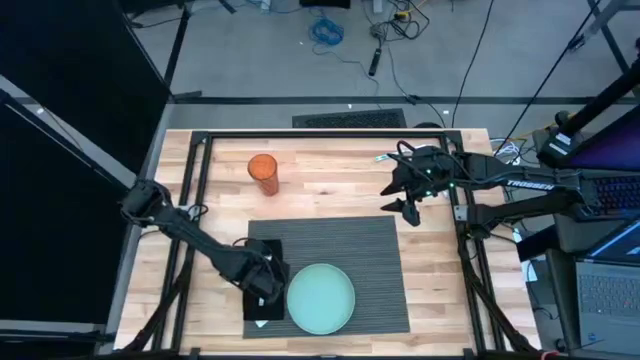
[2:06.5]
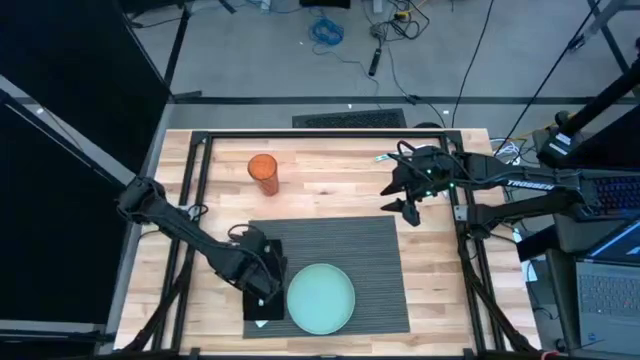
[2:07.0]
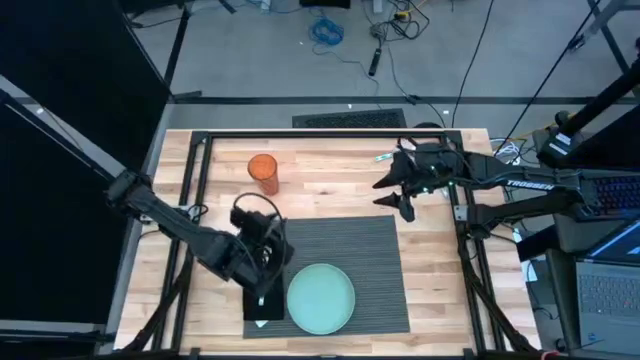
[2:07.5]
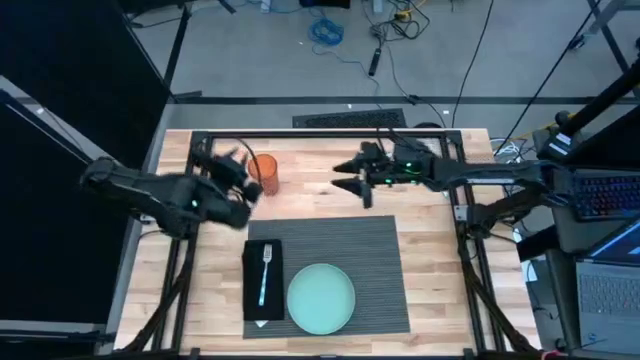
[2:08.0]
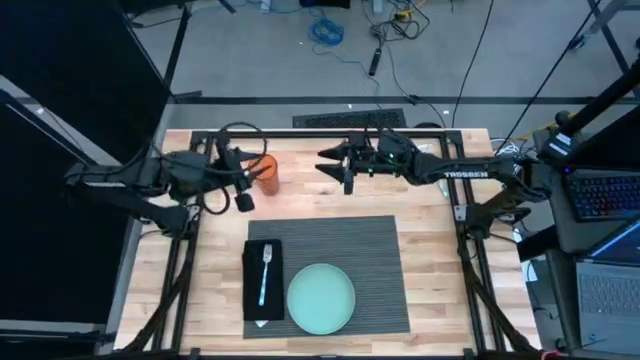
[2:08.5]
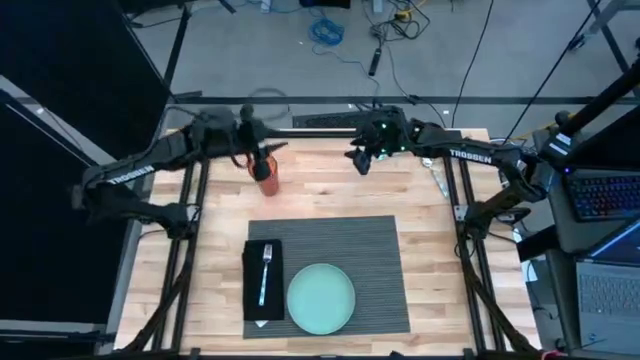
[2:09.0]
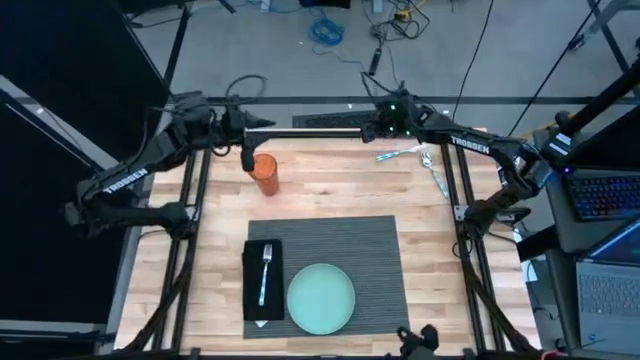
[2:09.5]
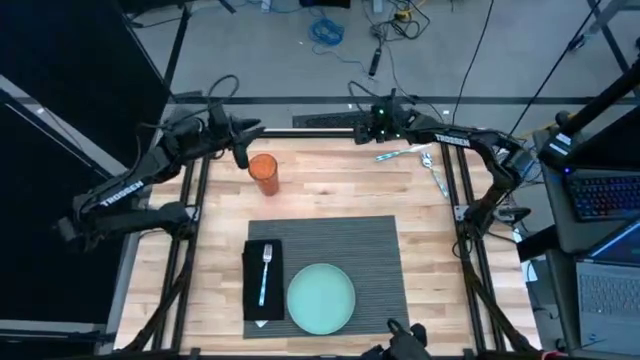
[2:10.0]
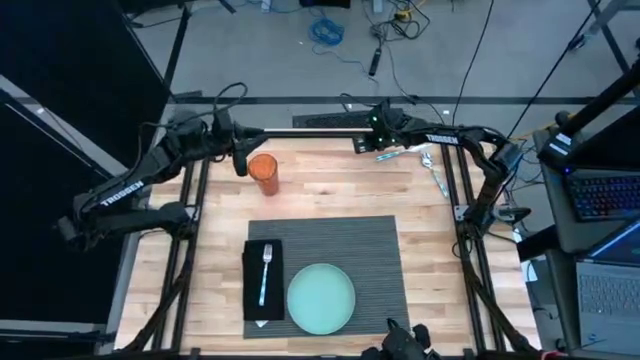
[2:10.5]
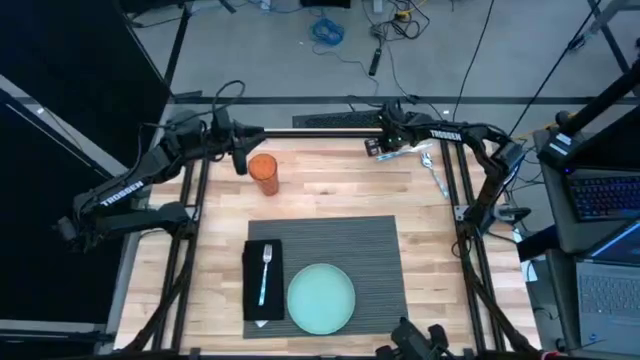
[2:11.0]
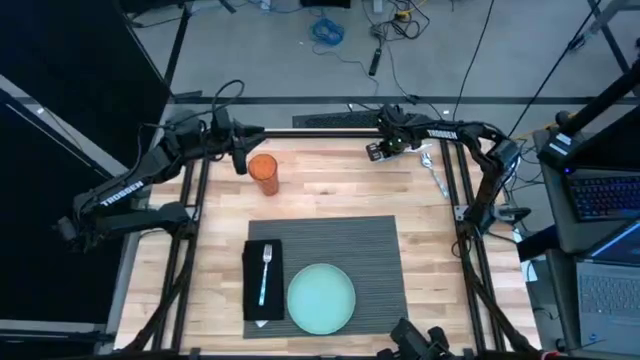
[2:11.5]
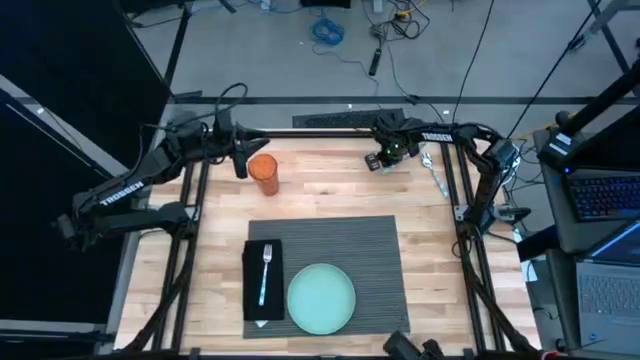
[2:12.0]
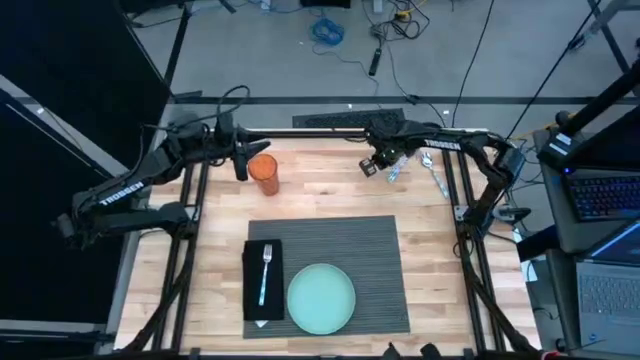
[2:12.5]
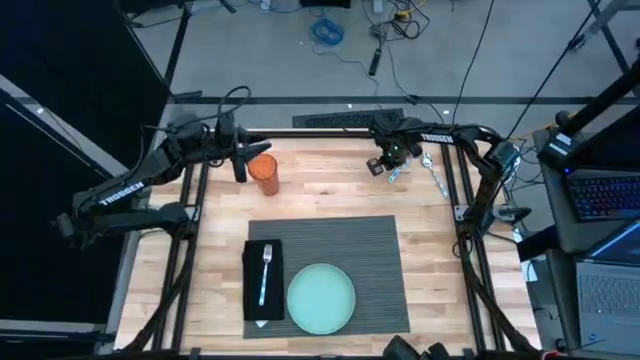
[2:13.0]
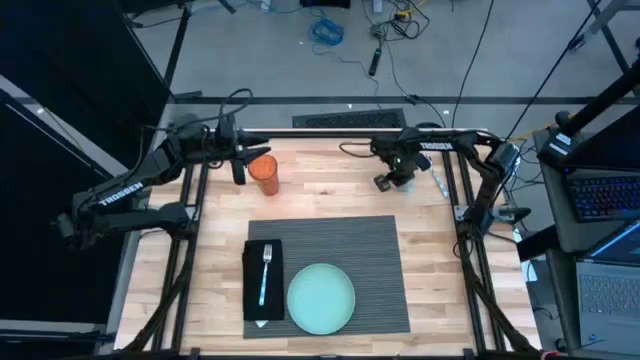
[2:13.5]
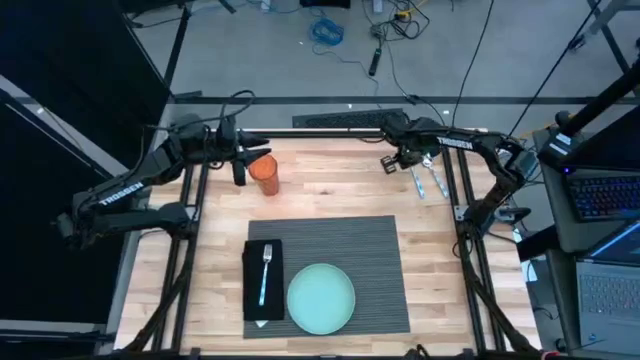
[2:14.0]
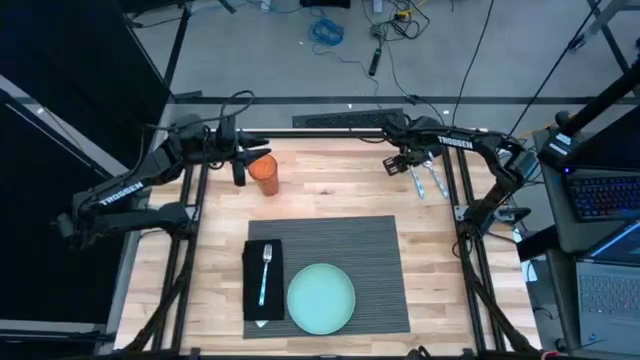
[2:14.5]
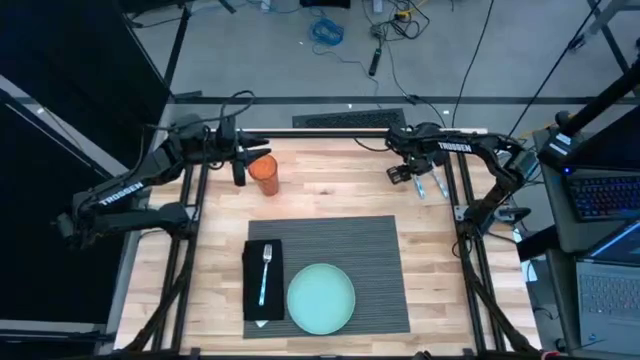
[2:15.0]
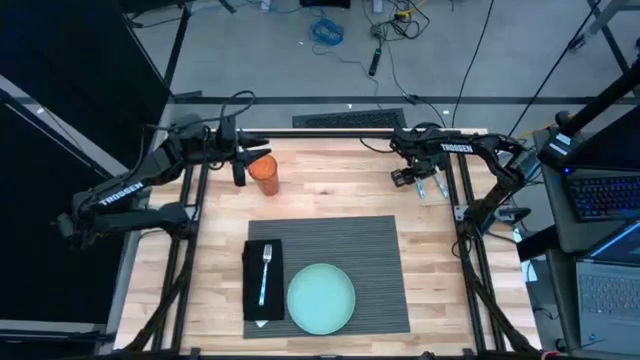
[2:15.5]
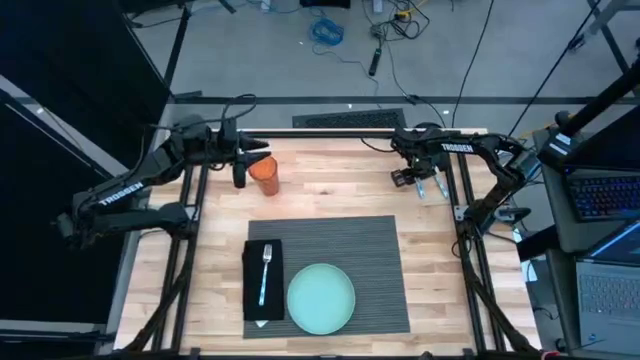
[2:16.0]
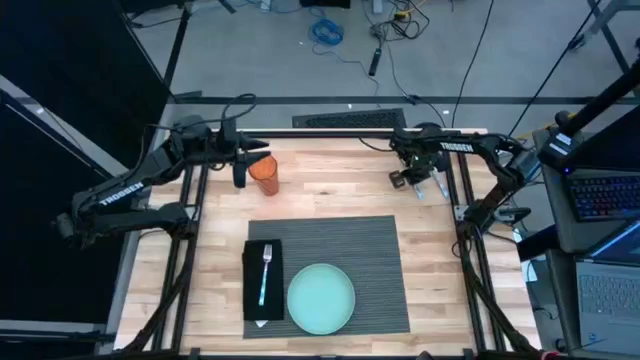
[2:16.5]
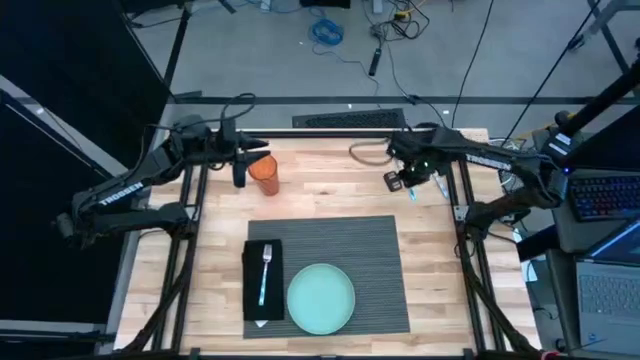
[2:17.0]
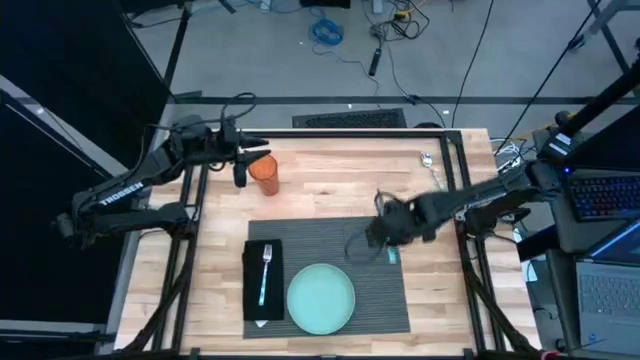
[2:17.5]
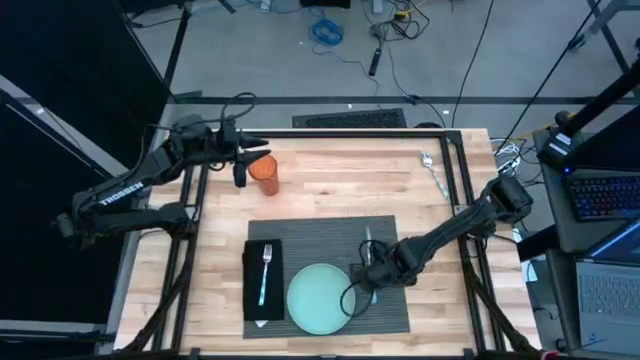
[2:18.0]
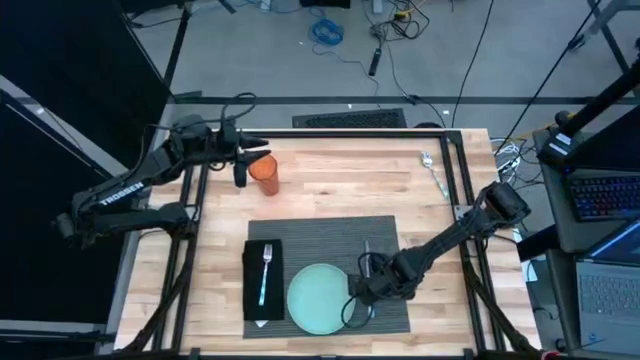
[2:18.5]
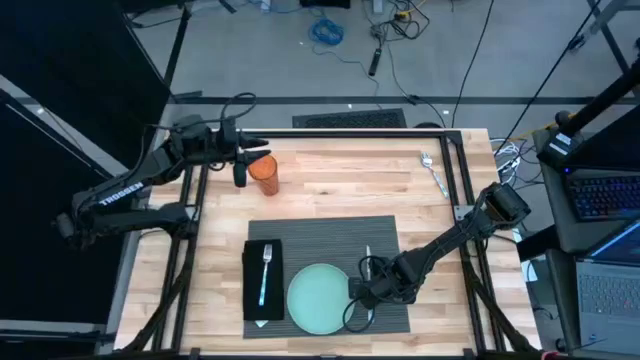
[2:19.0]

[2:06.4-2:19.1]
Task: Set table place
Put the white knife on the gray table mat

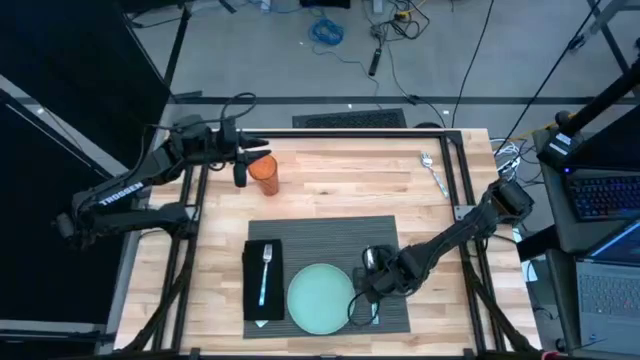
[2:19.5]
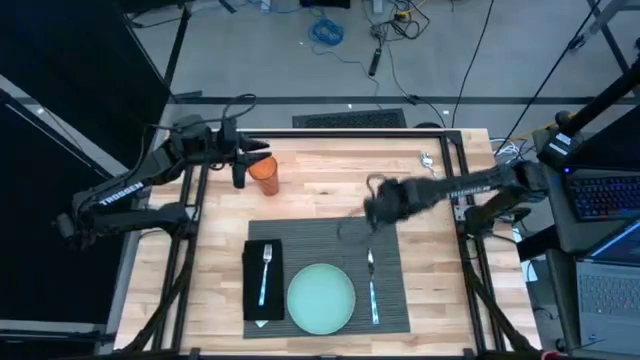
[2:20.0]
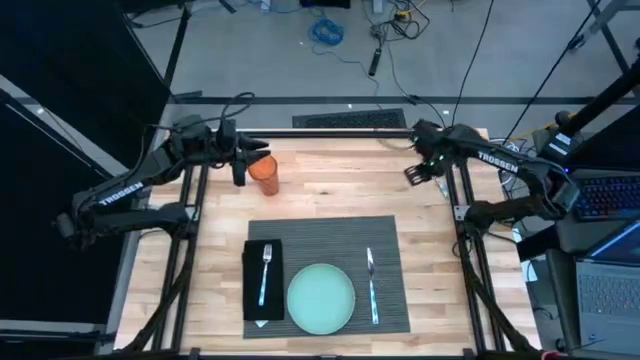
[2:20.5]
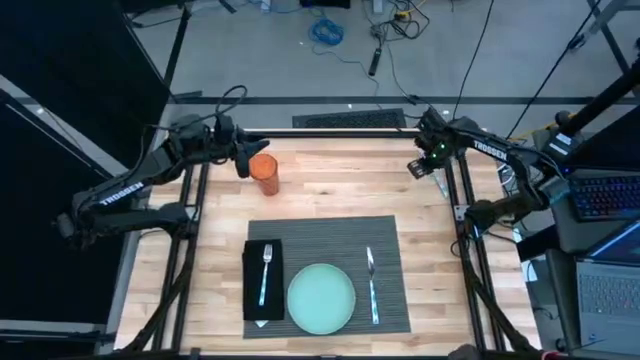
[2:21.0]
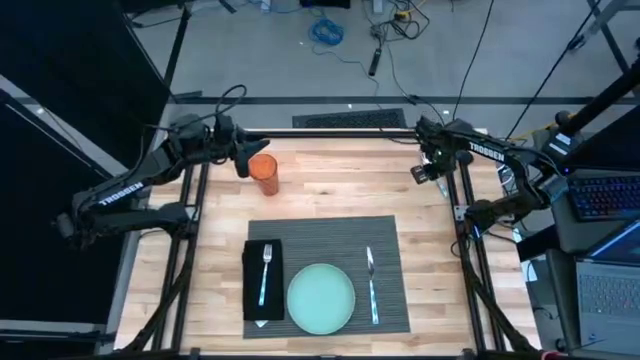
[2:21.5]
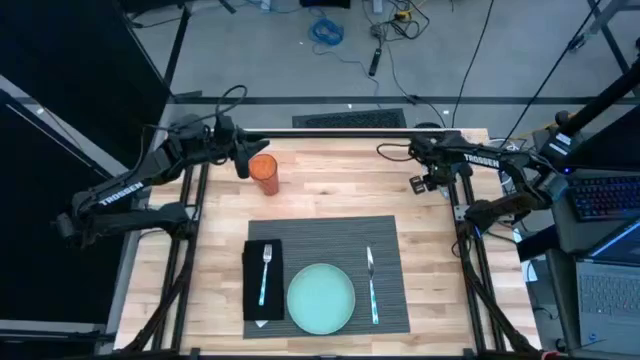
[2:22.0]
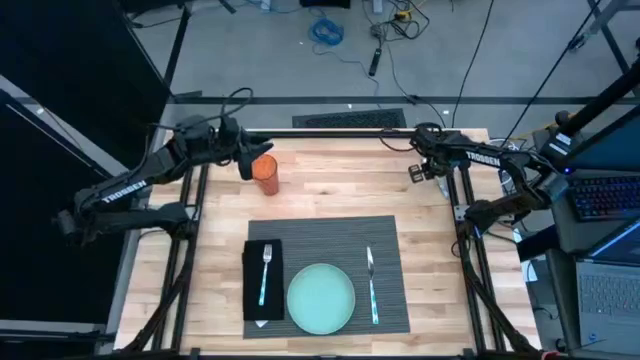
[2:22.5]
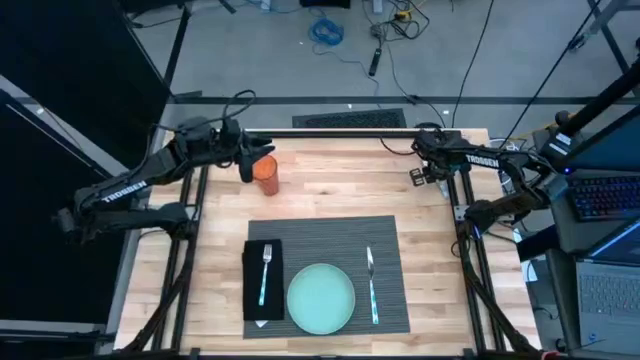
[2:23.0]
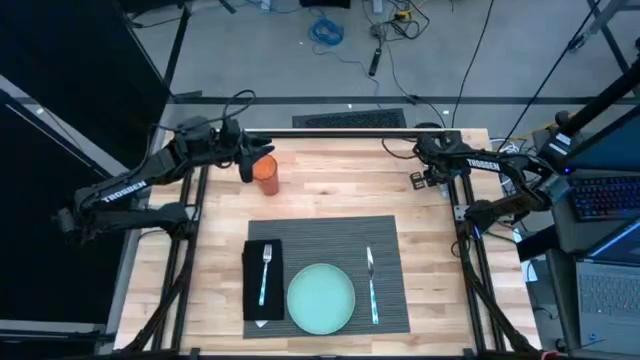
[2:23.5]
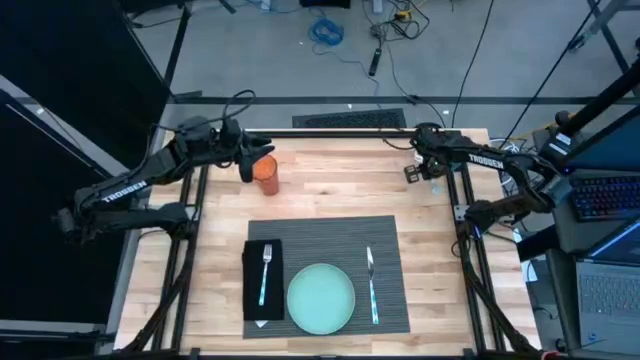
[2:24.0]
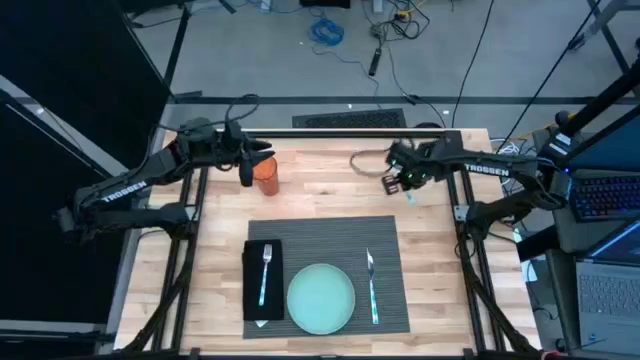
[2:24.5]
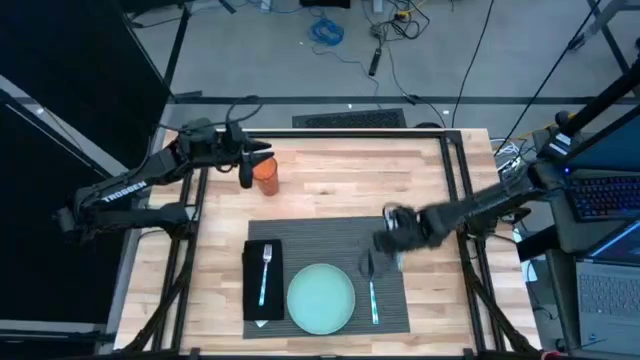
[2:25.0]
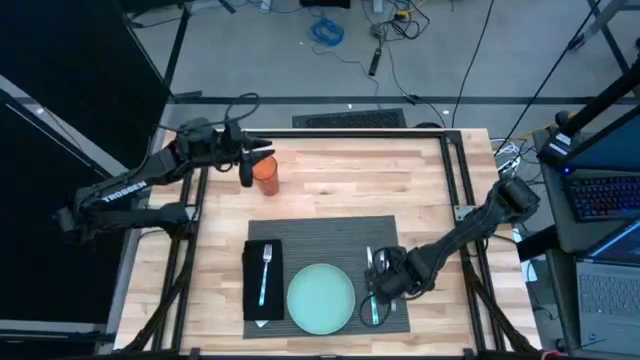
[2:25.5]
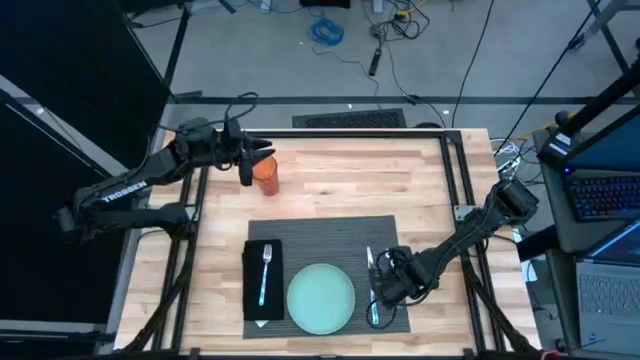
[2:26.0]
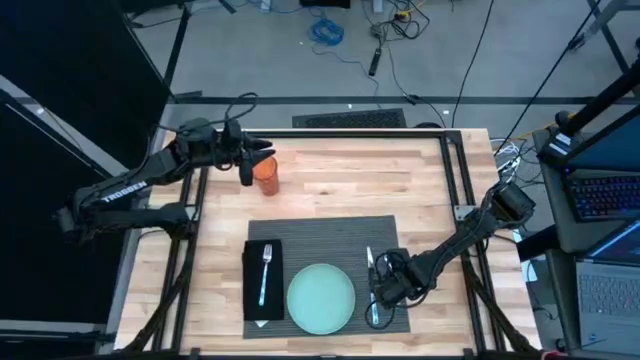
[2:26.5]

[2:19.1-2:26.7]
Put the white spoon on the gray table mat

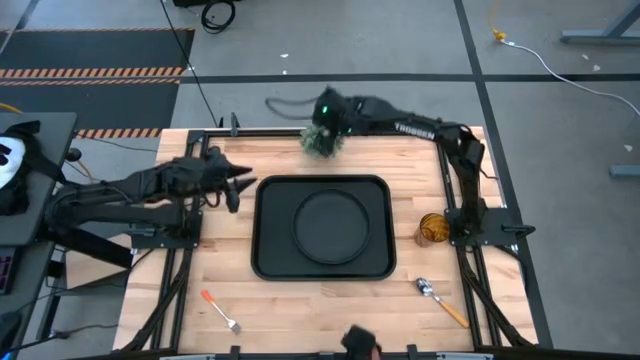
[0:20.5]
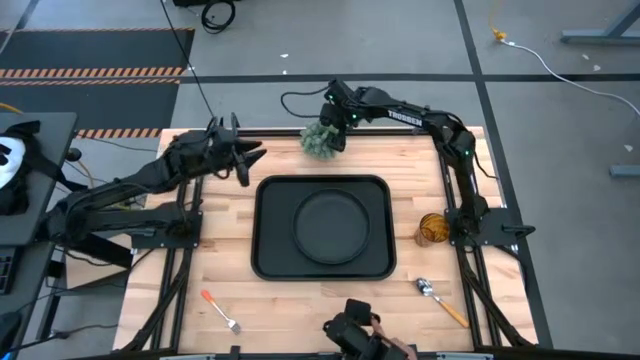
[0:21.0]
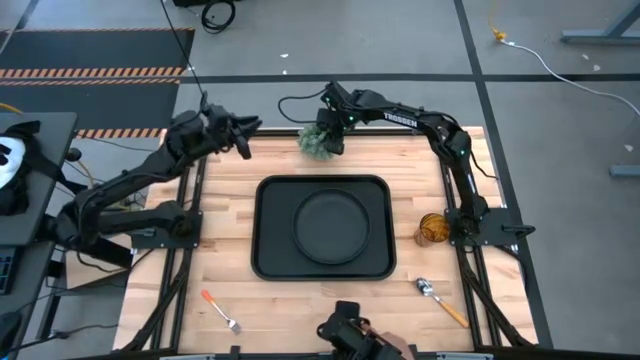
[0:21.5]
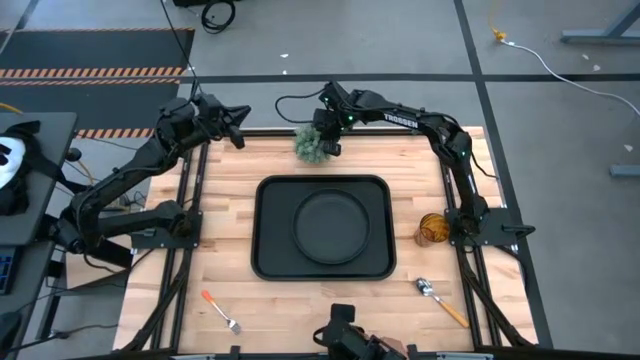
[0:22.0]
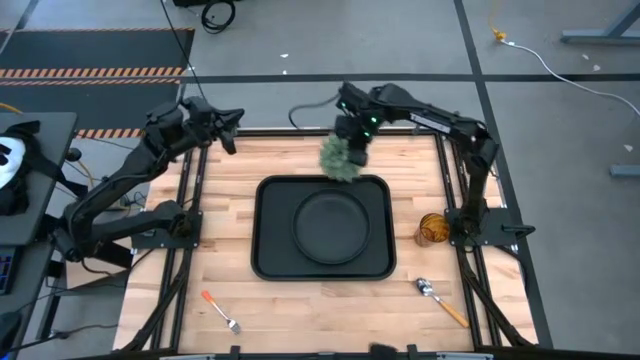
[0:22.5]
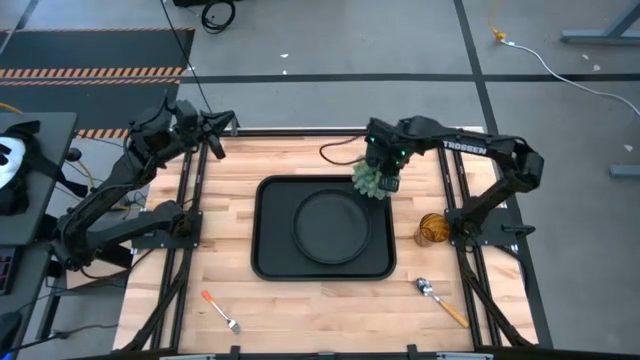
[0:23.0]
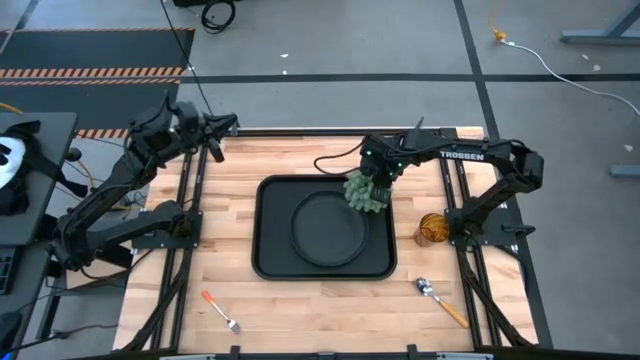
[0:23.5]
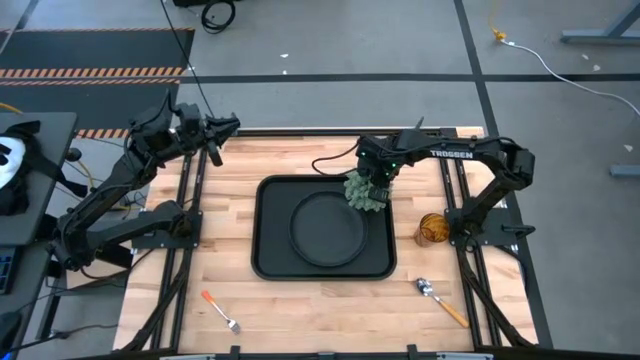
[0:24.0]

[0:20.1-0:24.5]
Task: Pick and place plate/cup/fork/spoon on tray
Put the gray potted plant on the black serving tray to the top right of the black plate
